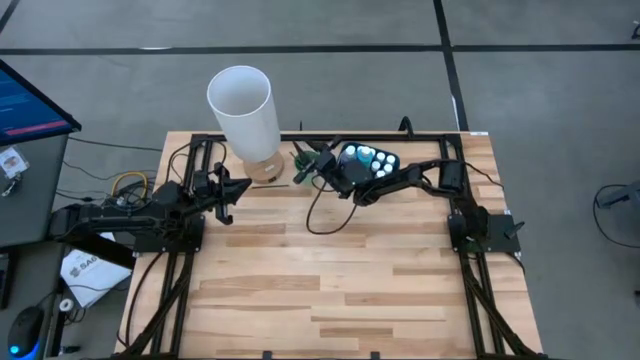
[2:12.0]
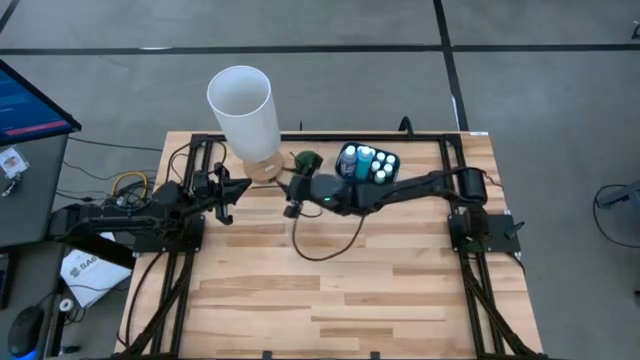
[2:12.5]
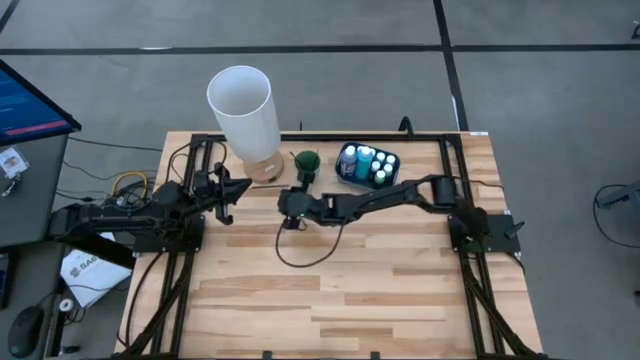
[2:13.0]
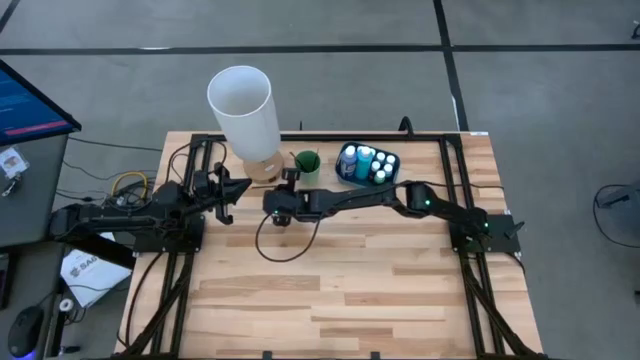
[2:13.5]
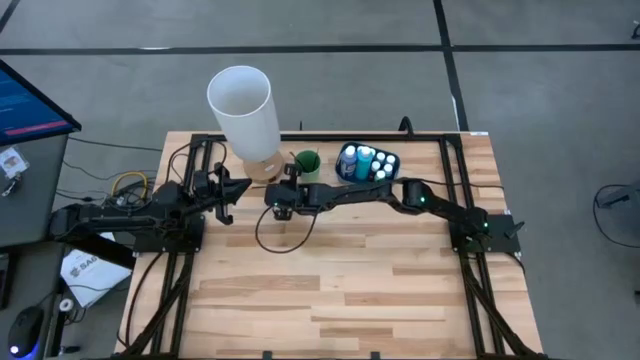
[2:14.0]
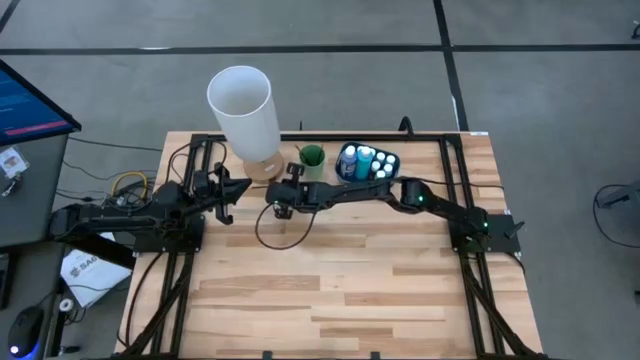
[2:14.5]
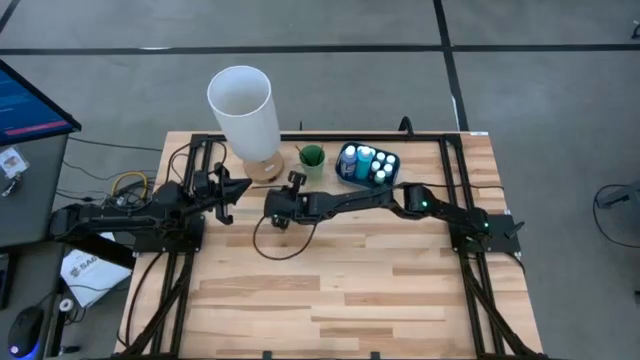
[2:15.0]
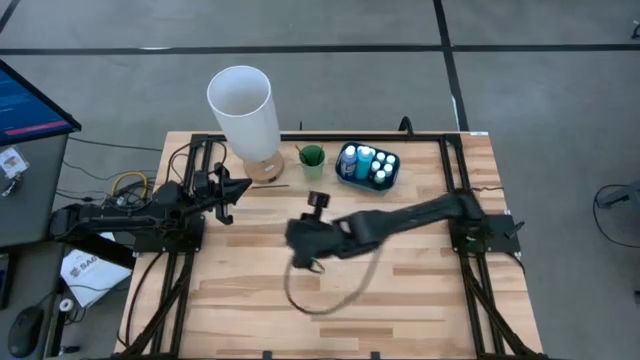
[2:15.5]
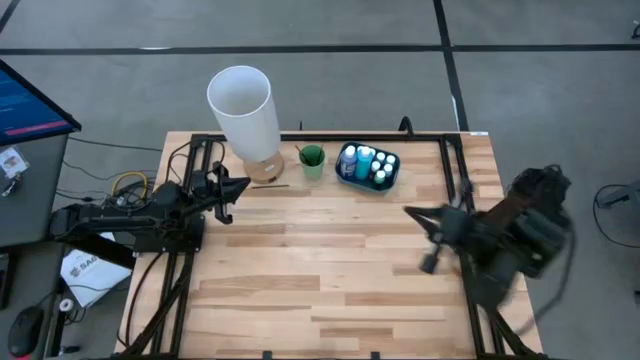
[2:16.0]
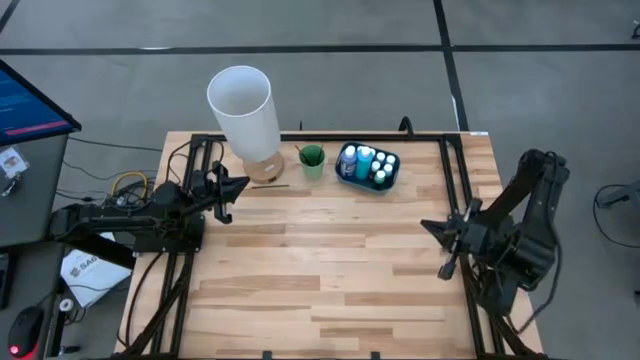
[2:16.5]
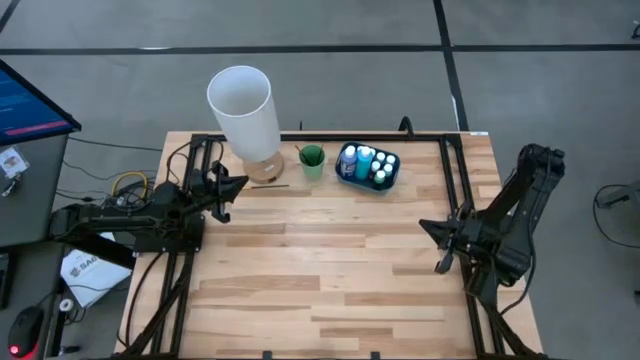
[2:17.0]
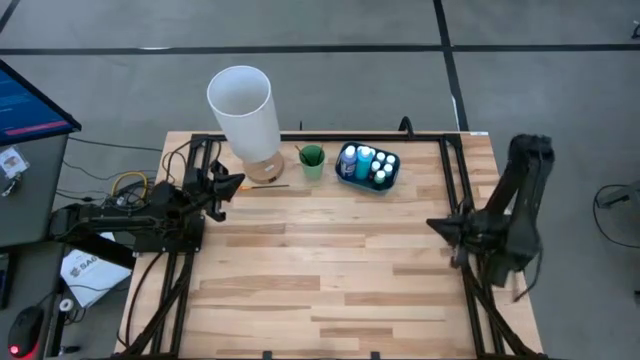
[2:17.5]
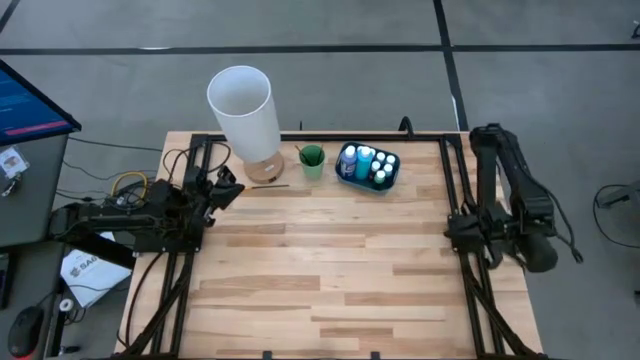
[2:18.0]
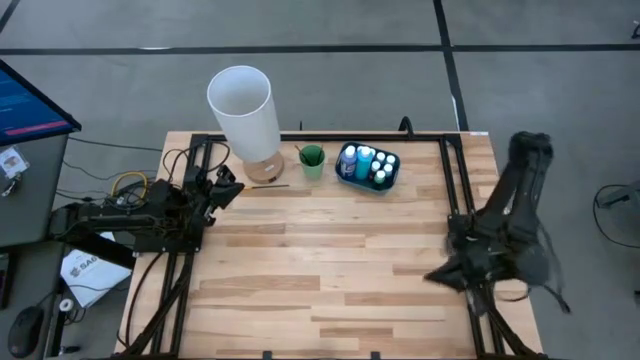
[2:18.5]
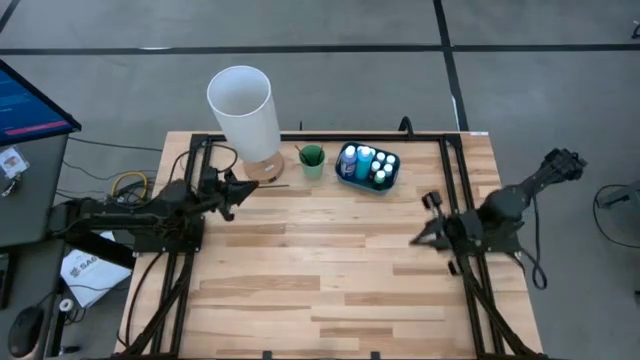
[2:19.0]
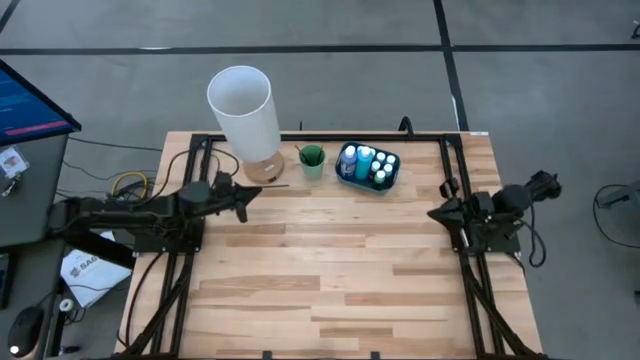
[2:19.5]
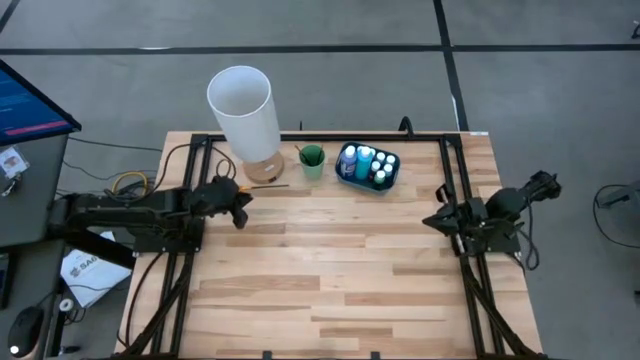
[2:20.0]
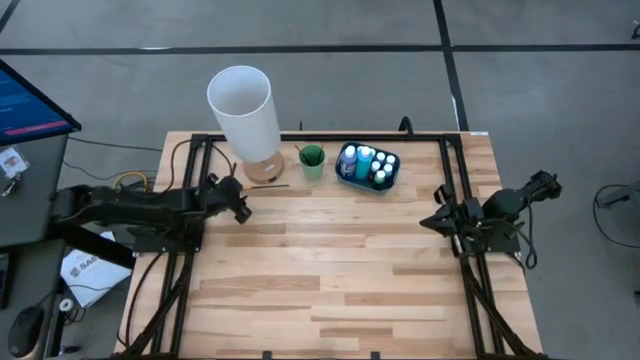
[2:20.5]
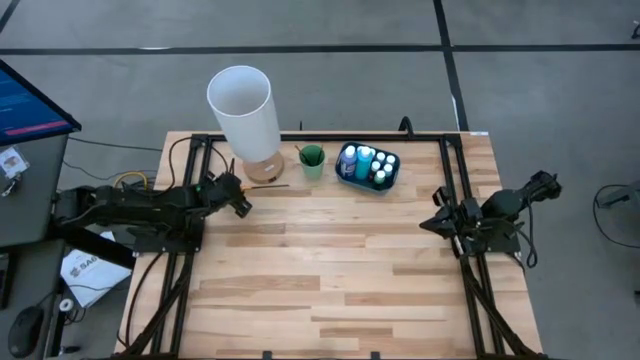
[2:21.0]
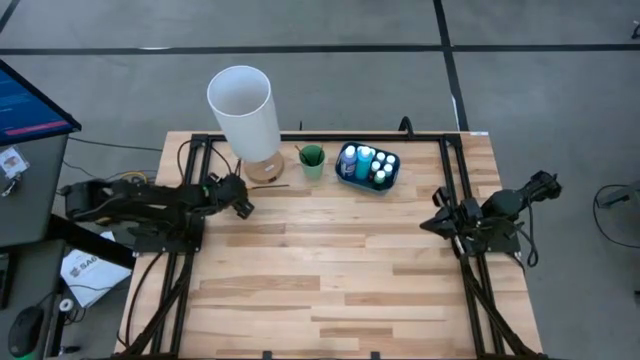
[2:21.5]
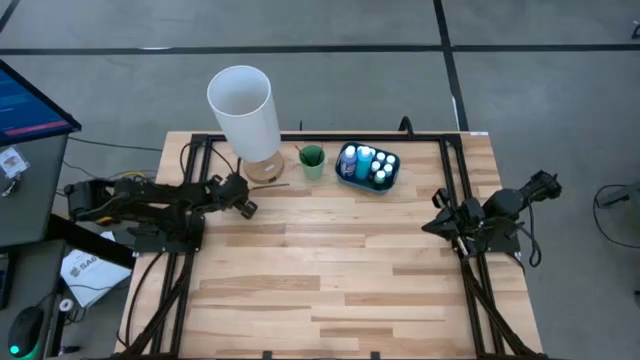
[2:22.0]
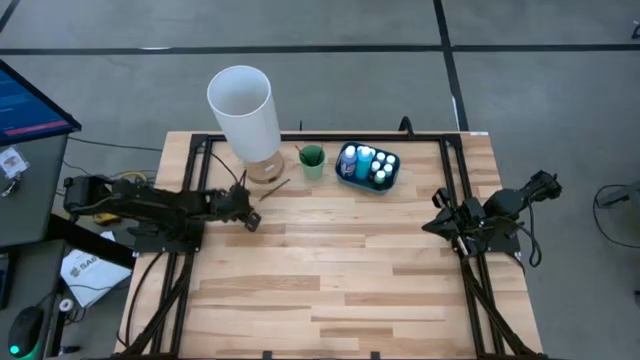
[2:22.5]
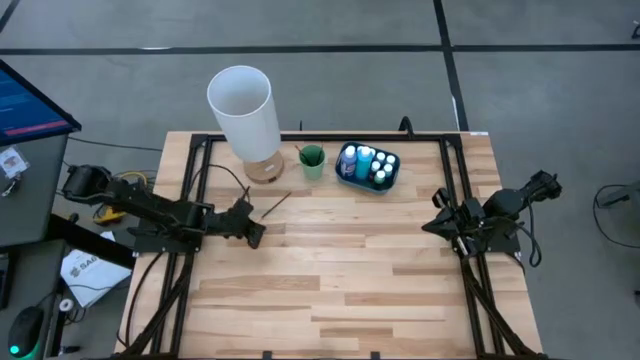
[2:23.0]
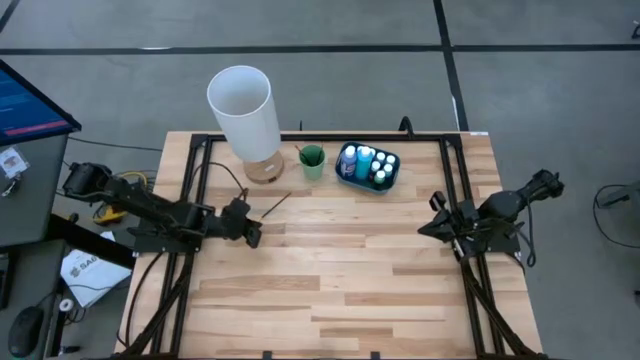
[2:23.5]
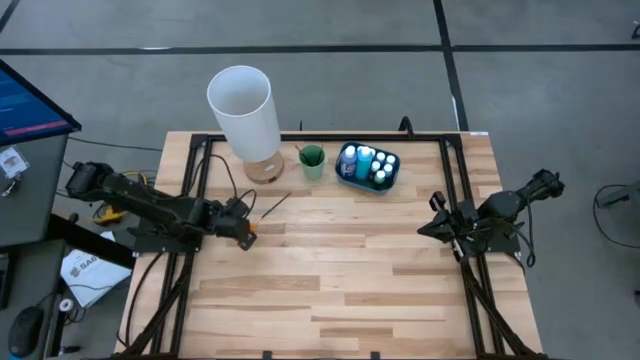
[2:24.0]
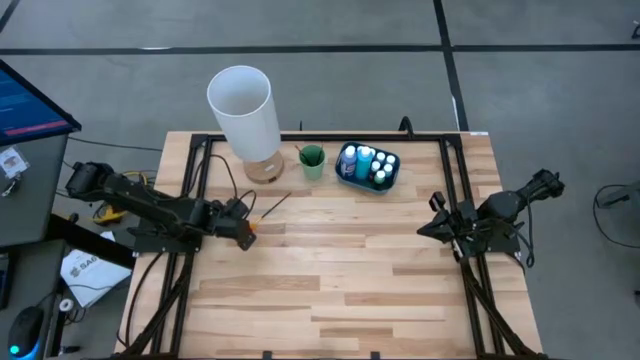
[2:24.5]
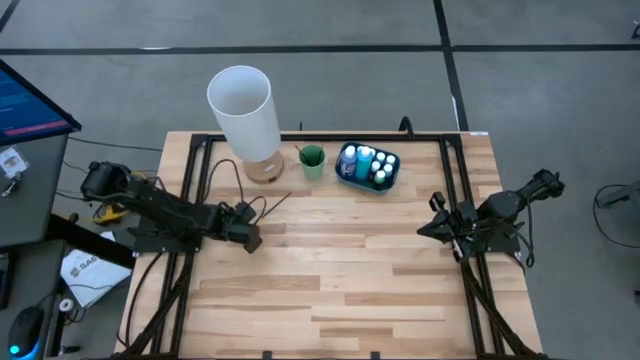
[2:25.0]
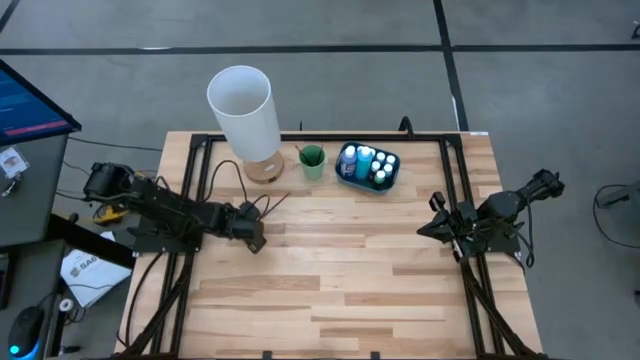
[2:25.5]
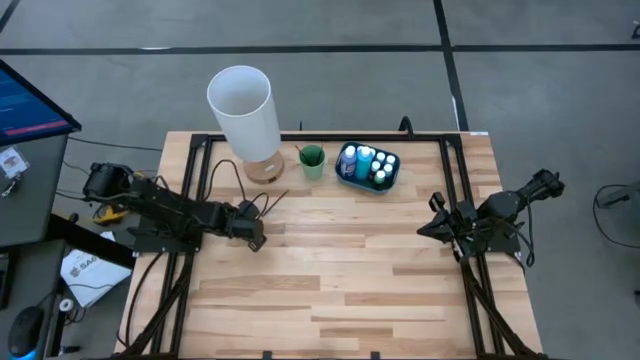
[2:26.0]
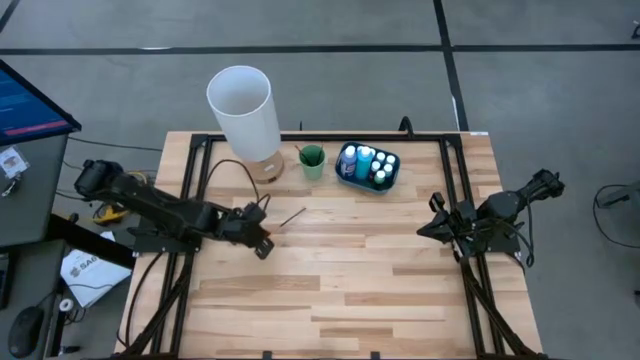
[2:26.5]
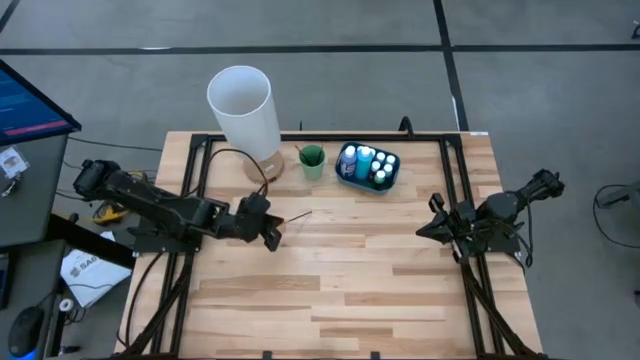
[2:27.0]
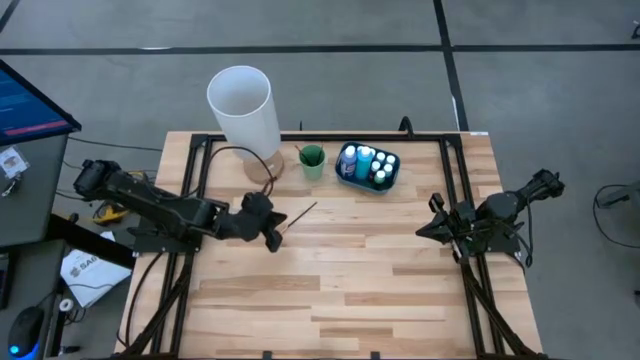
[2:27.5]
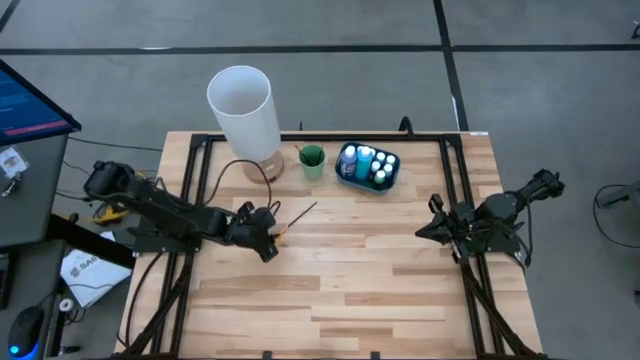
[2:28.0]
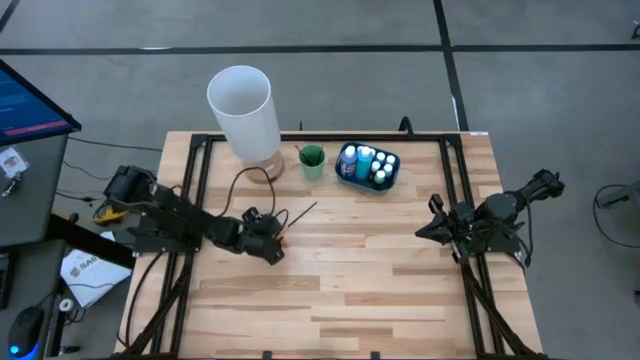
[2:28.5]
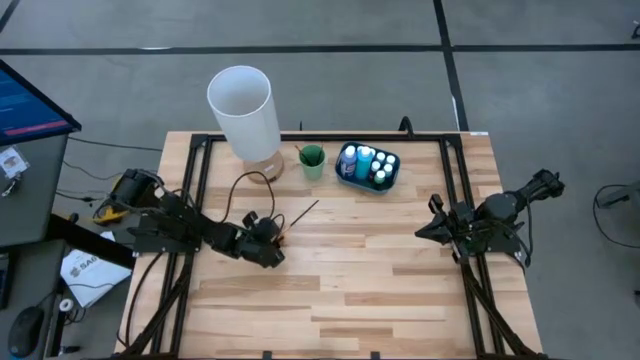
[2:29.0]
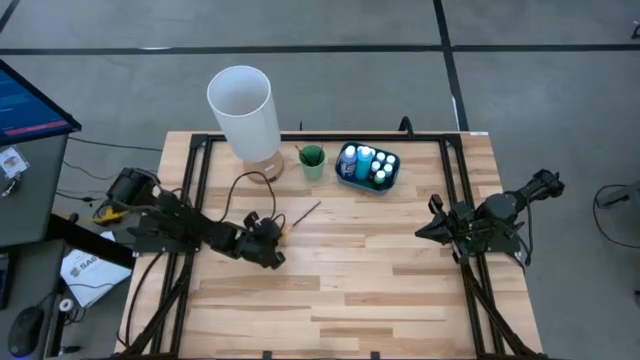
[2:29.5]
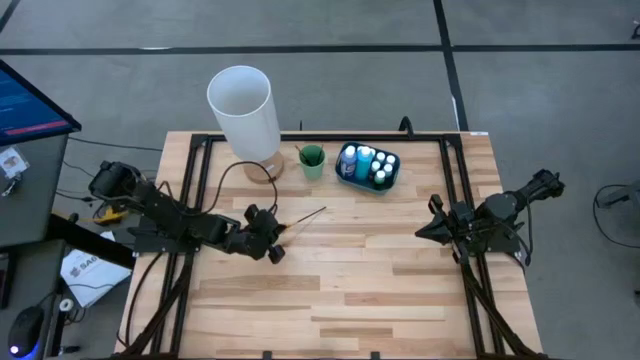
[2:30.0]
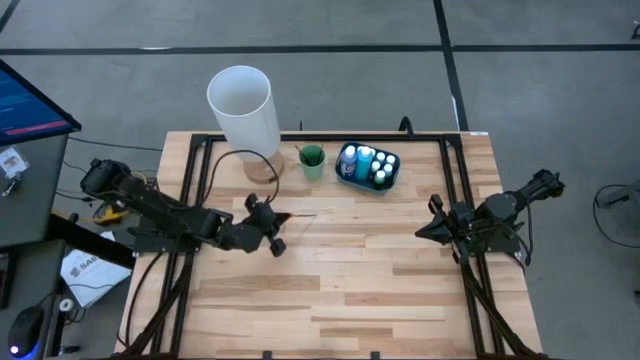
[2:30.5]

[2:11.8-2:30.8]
Task: Pick & Place Paint Supplies
Put the gold paint brush into the green cup

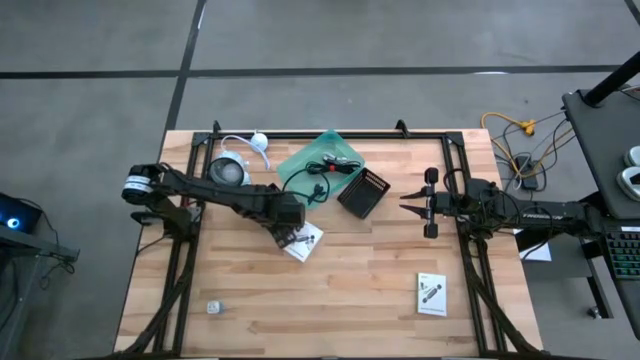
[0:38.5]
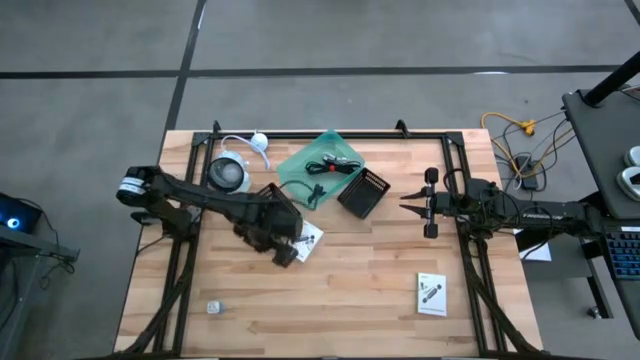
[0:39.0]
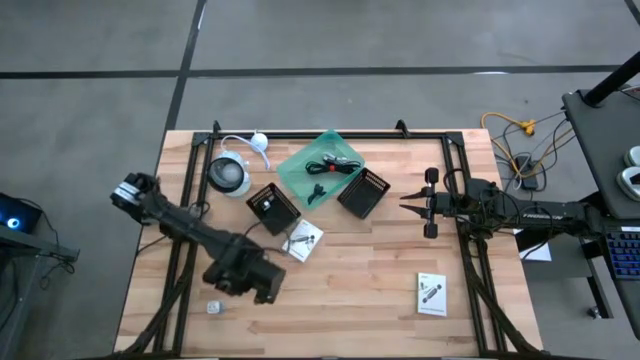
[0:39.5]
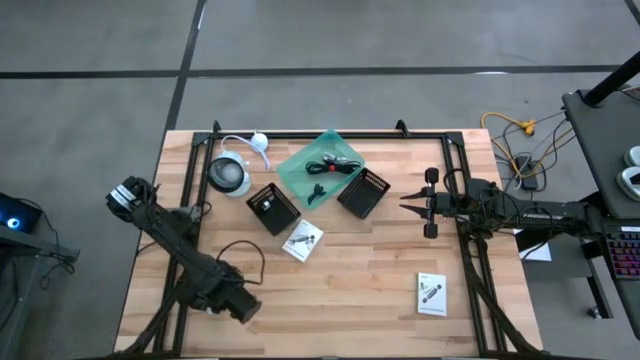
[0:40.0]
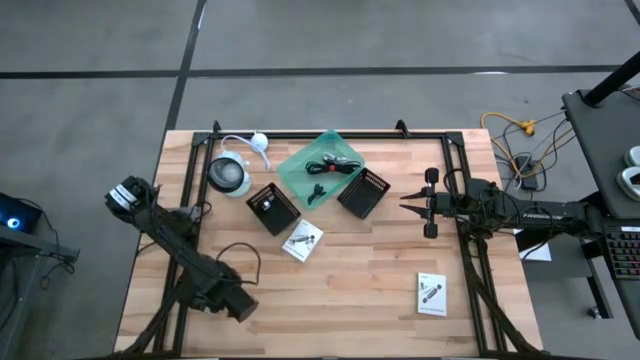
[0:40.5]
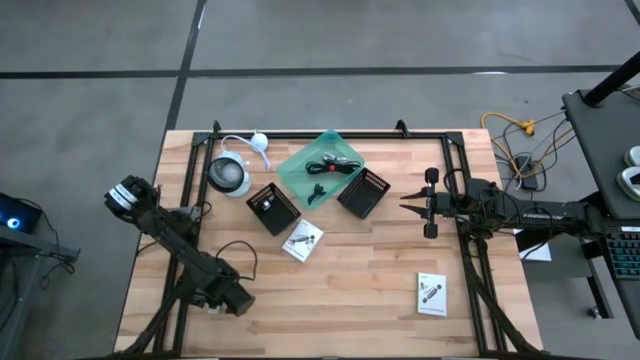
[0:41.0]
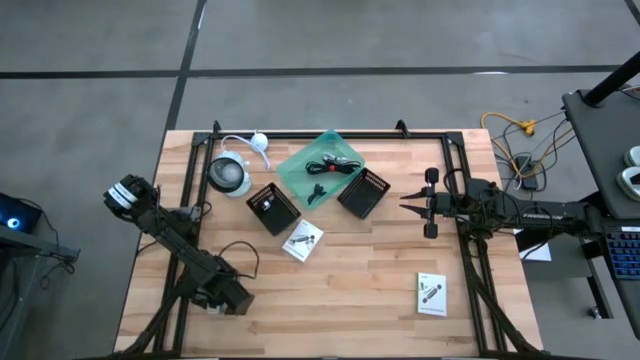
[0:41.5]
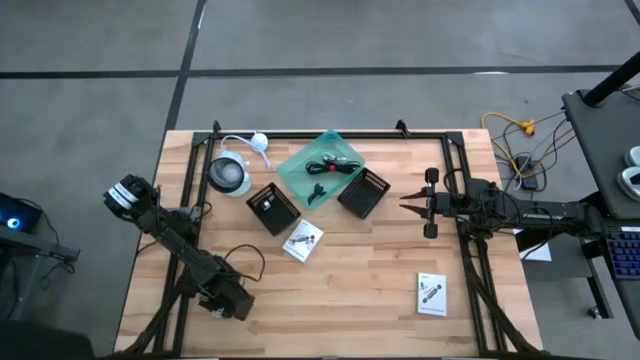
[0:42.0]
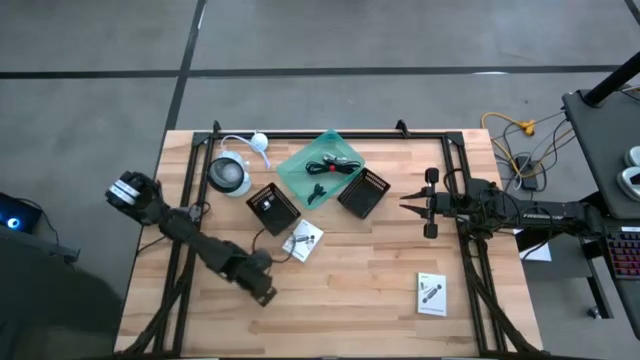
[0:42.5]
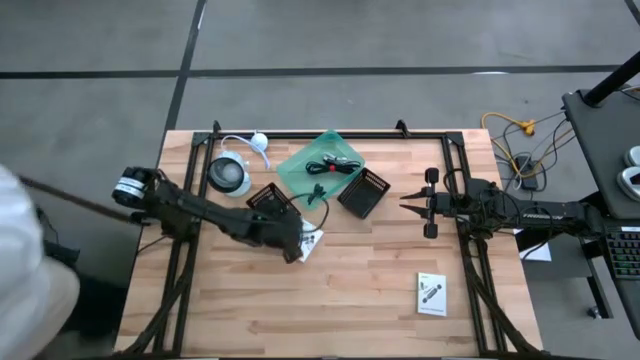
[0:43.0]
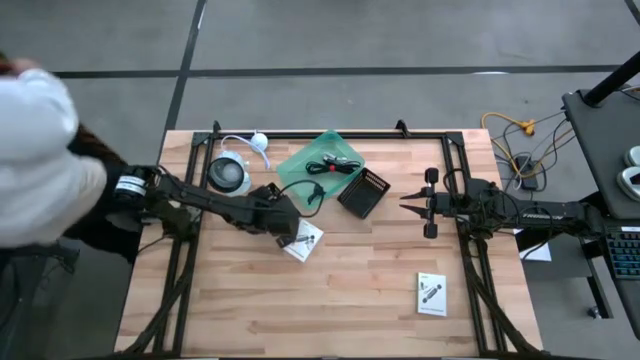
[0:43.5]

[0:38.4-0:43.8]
Task: Pick and place items into bin
Put the blue charger adapter into the left black bin
